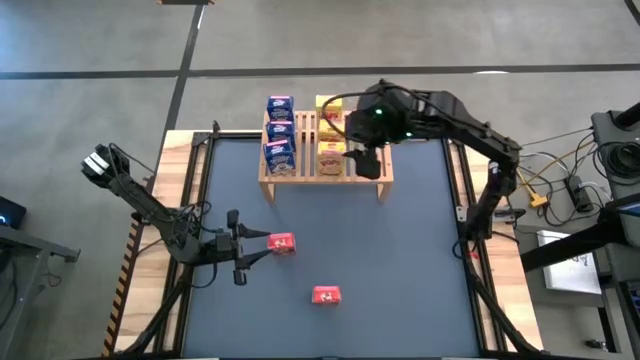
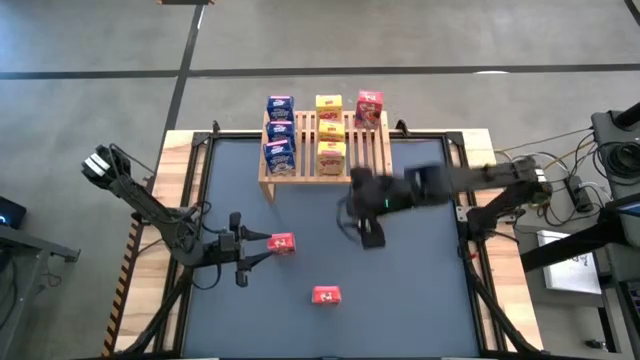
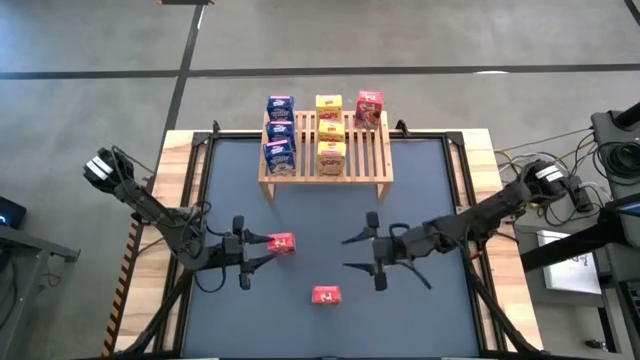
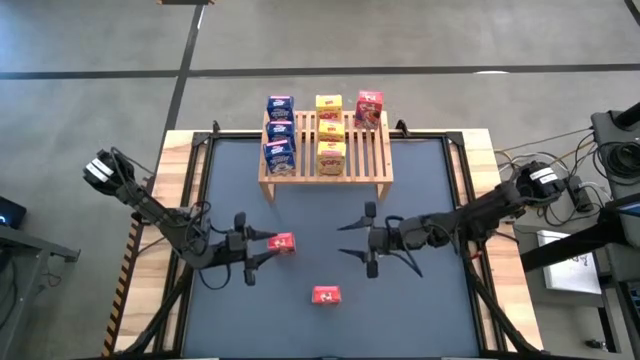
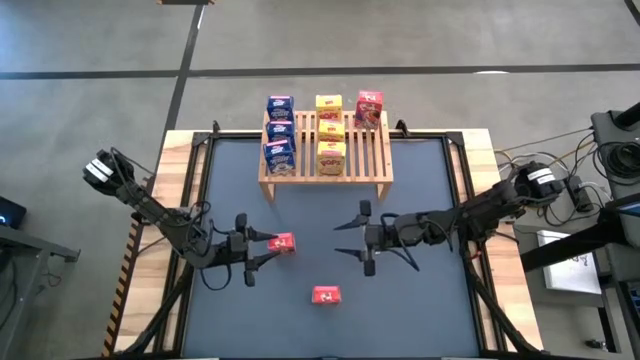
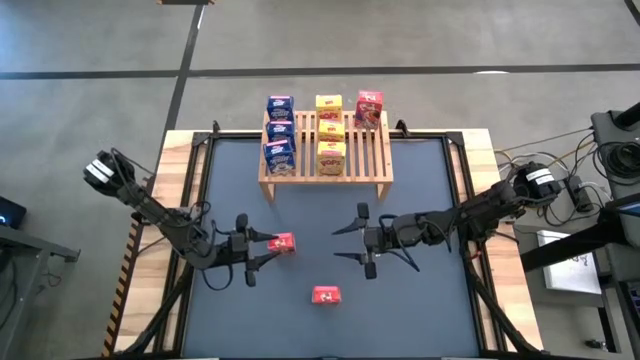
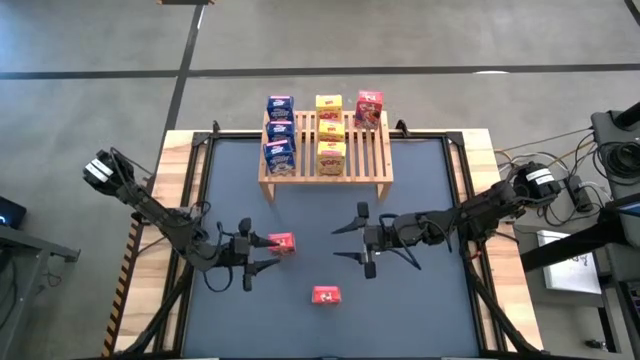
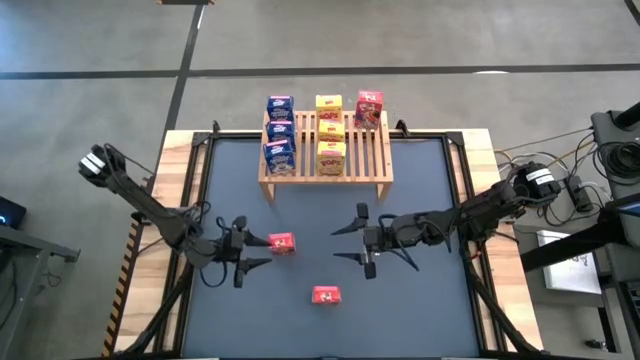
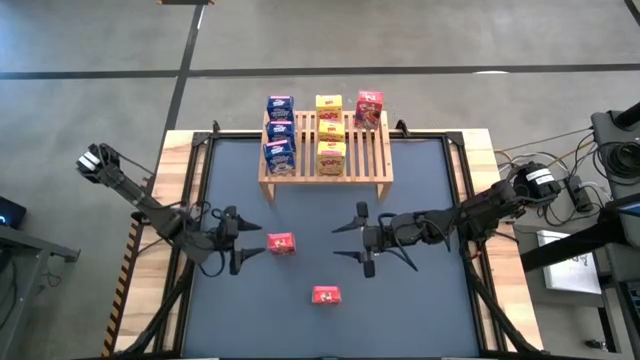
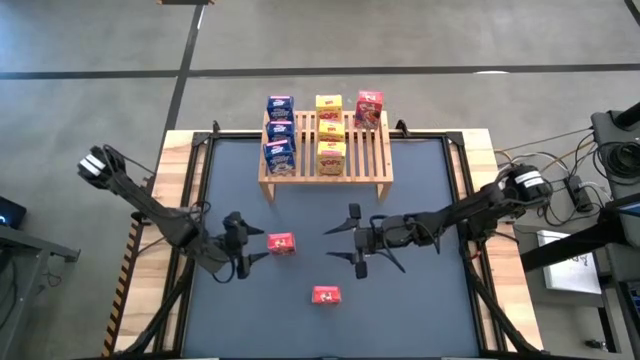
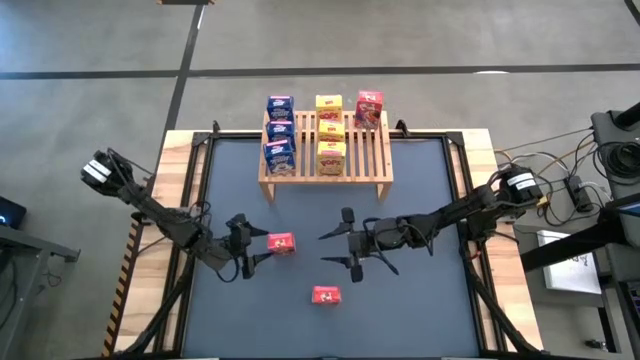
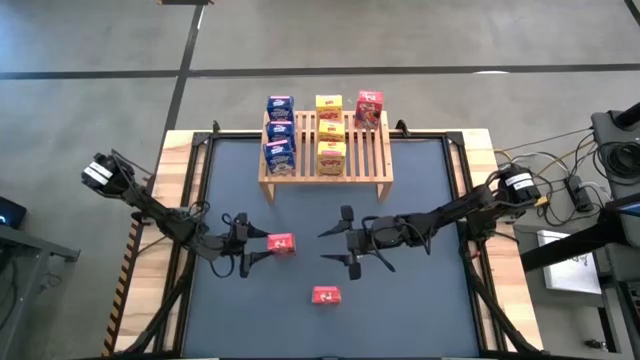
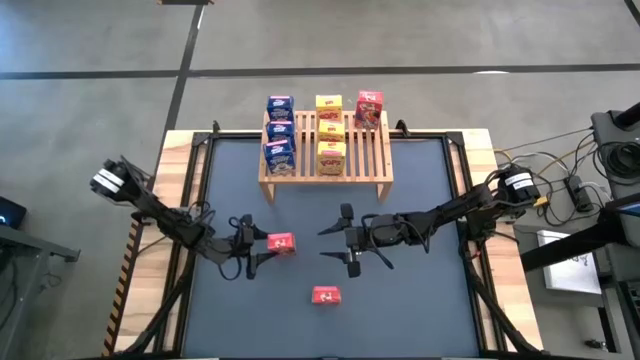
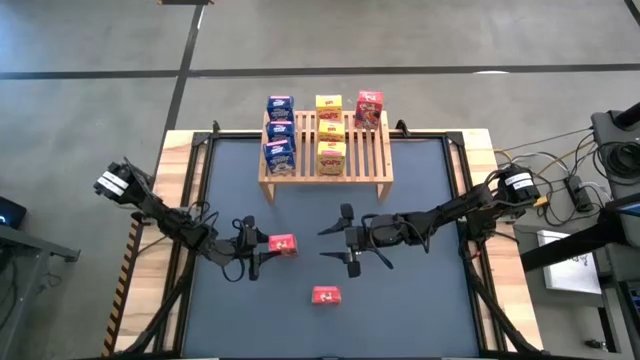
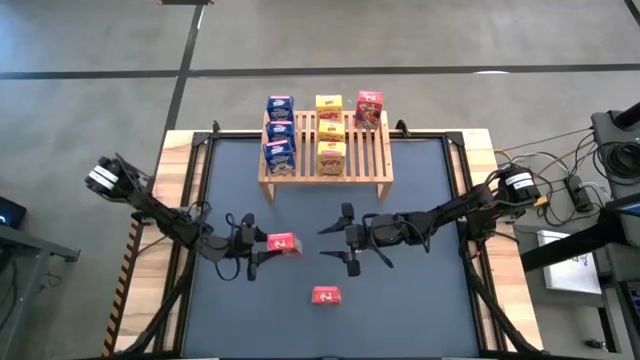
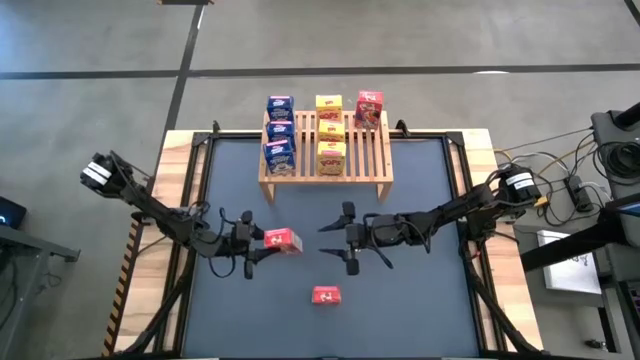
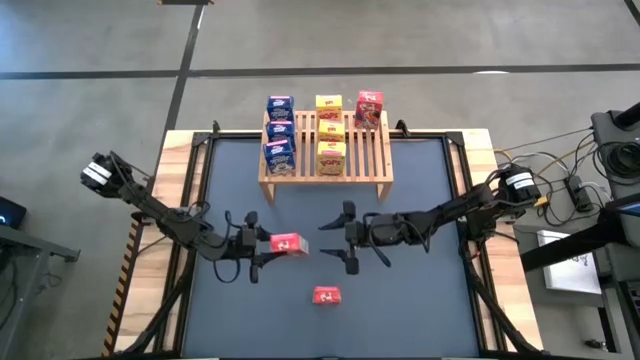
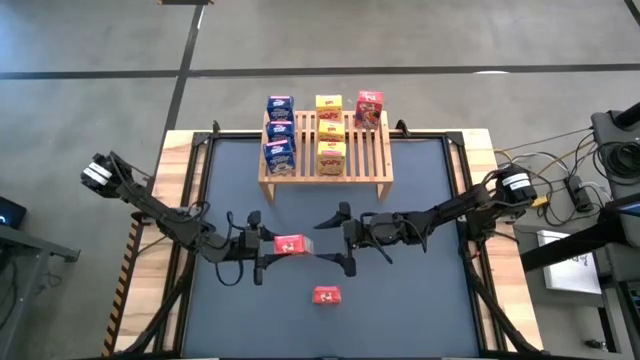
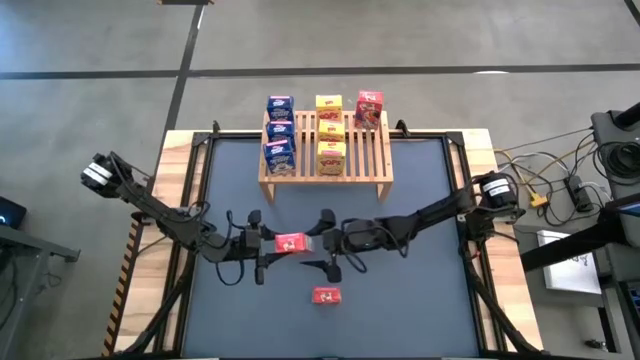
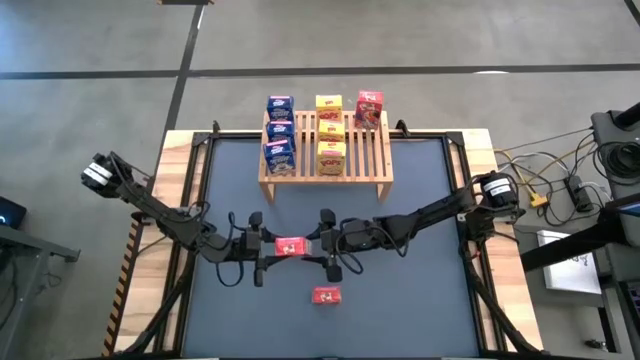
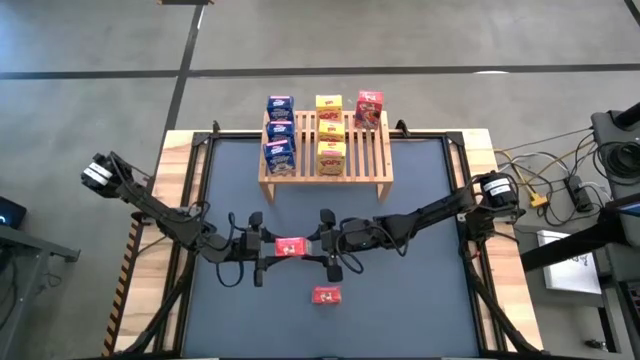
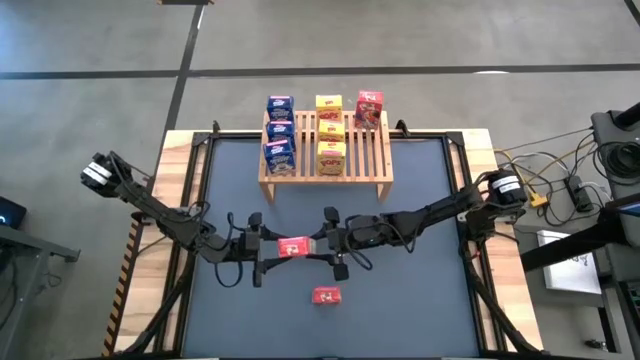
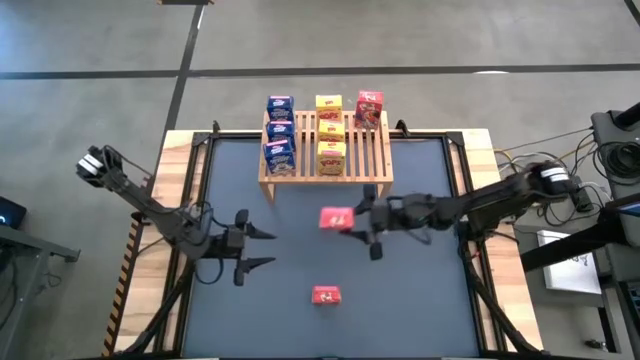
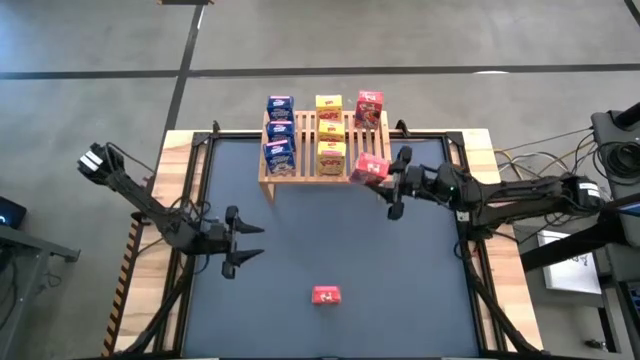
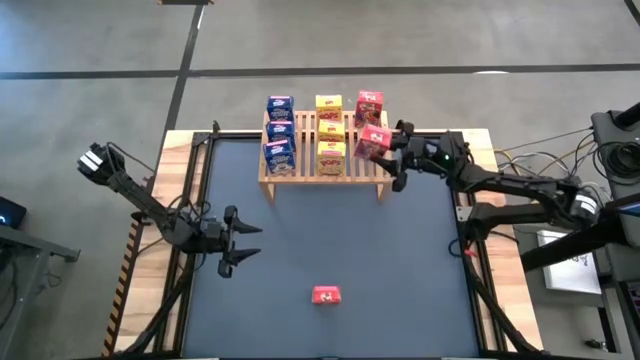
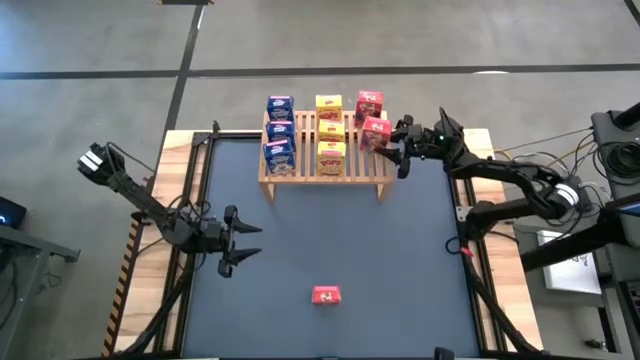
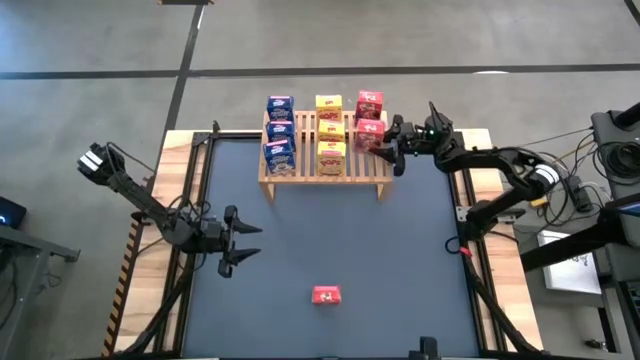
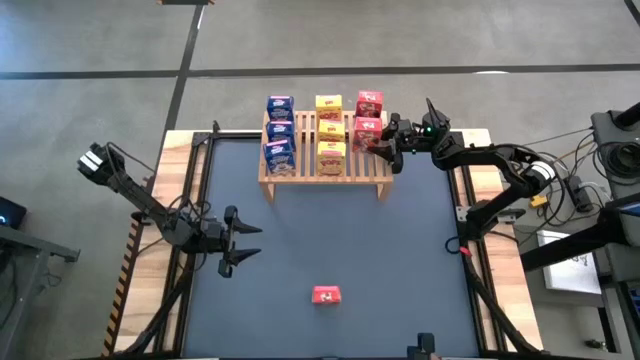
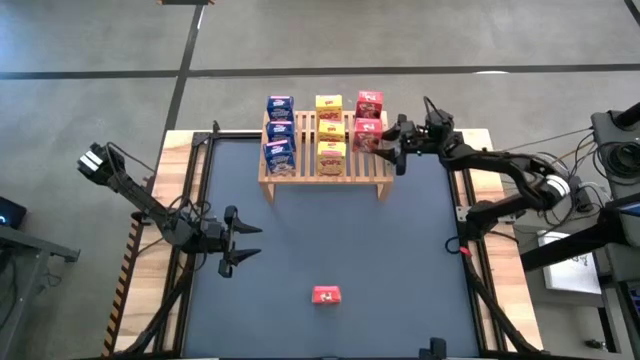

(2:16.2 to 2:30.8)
Task: Stack cereal on shelf
Put the top red cereal box on the shelf aligned with the red cereal box

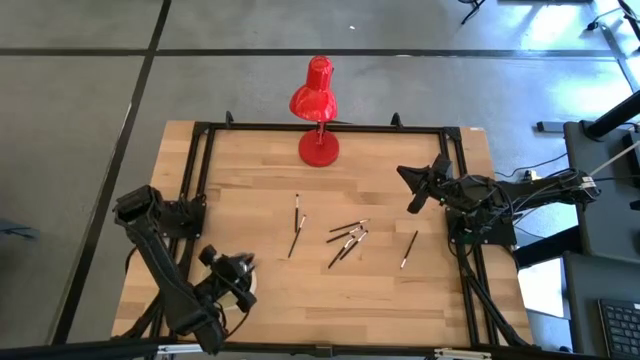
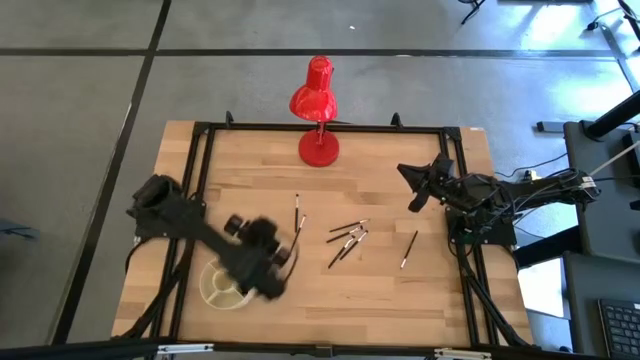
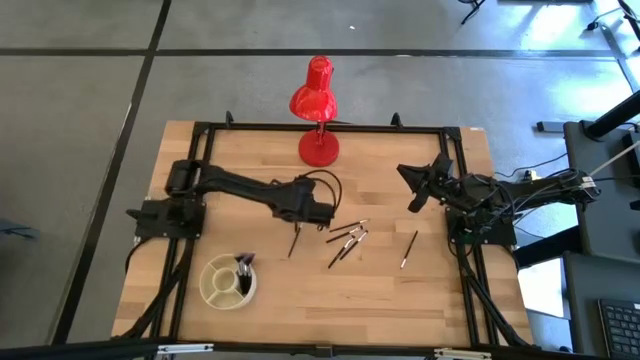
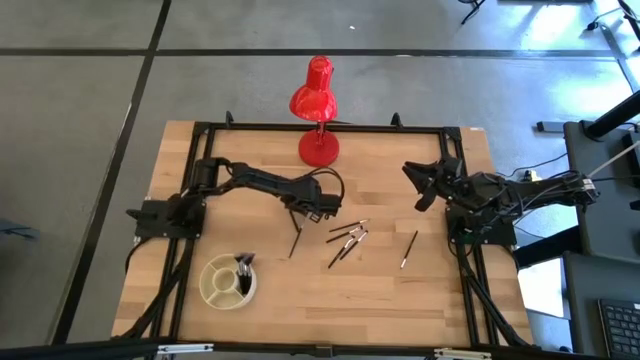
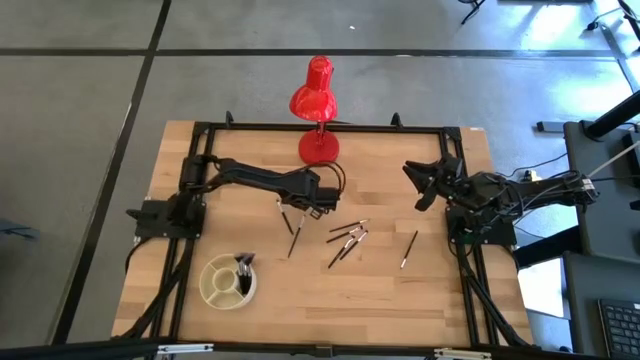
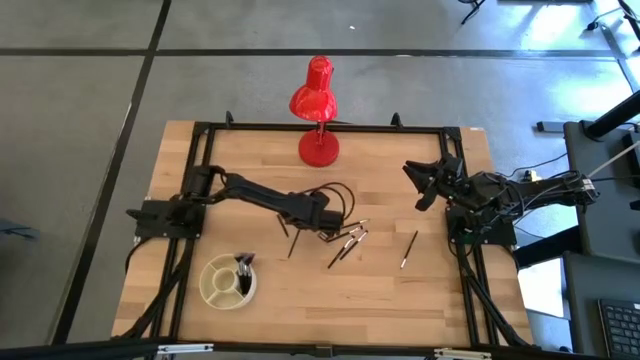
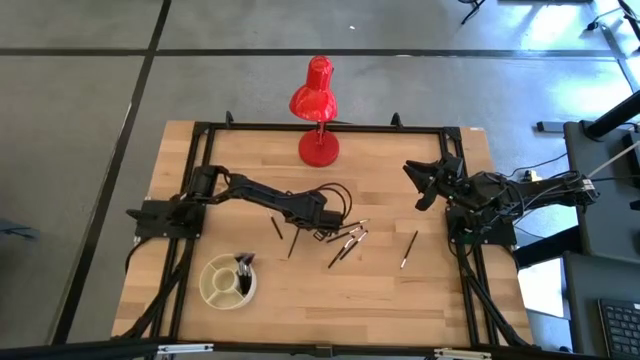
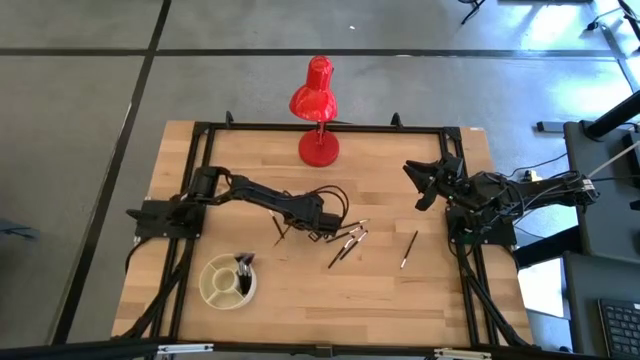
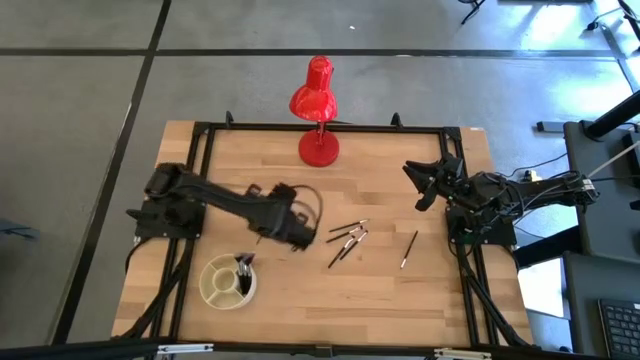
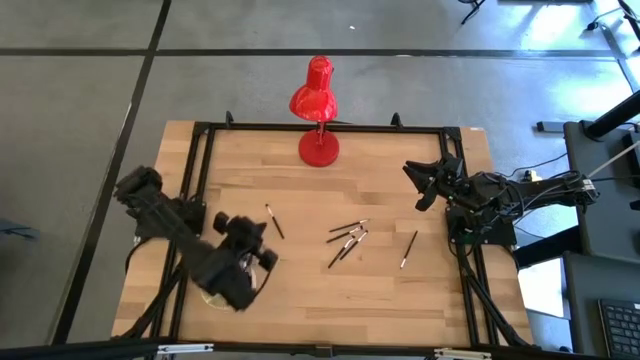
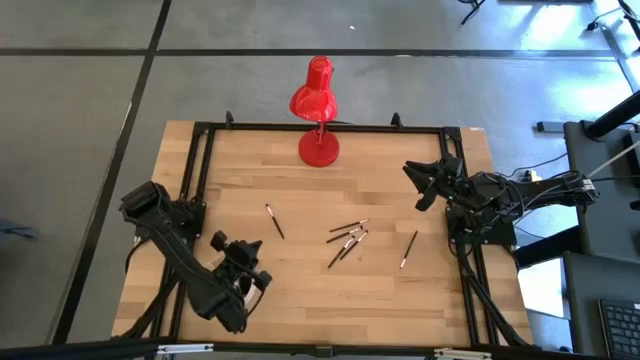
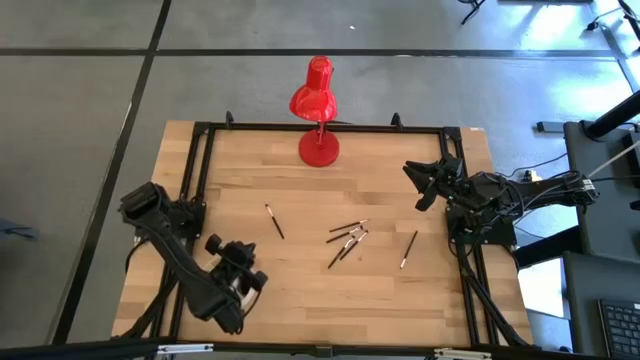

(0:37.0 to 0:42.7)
Task: Put items in baskets/containers
Put the eyeshadow brush into the pen organizer

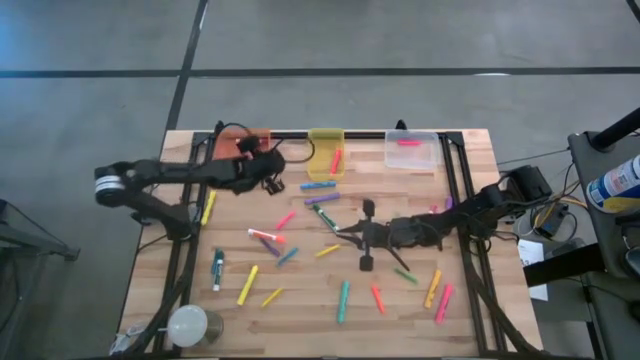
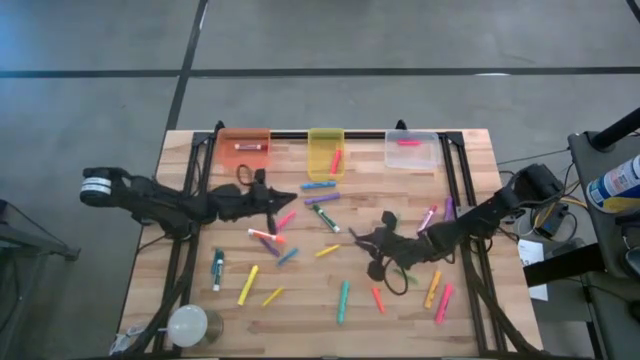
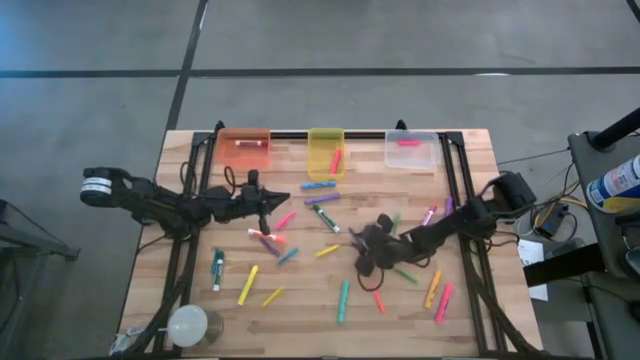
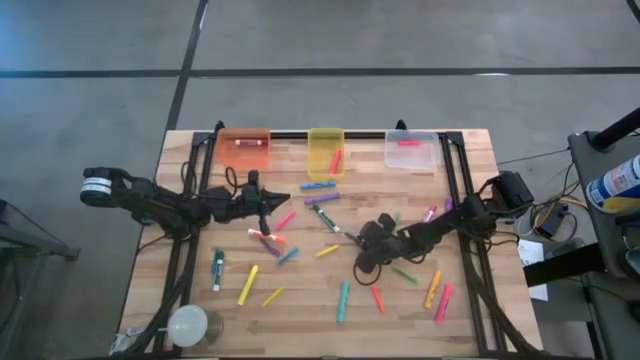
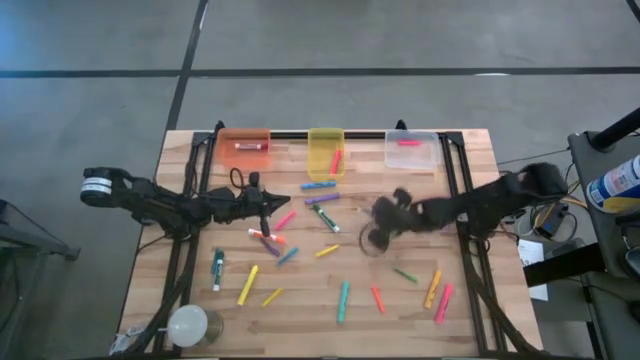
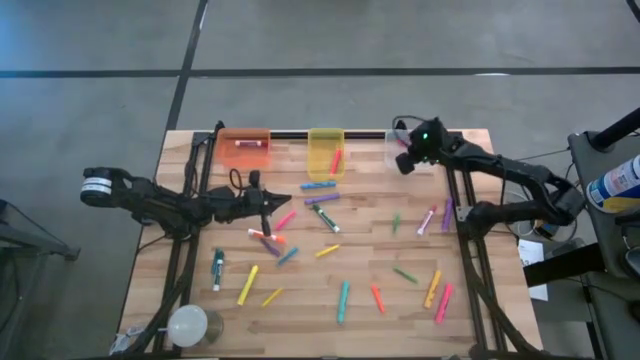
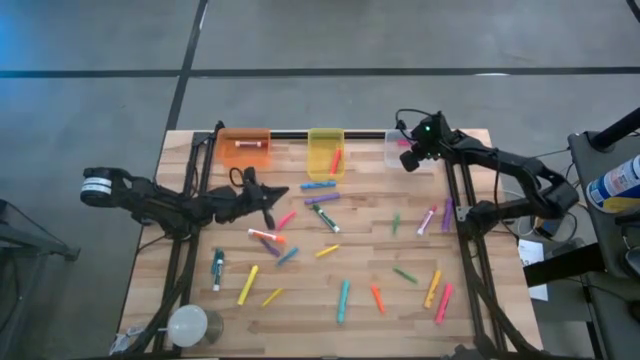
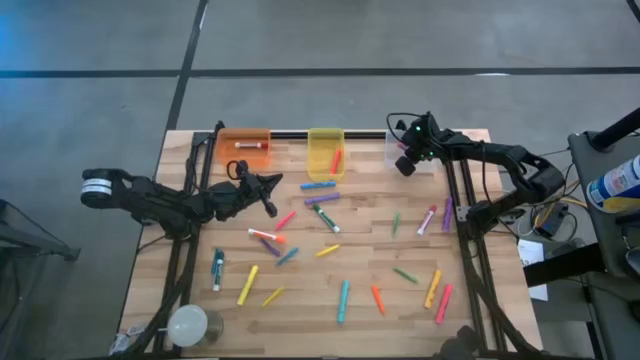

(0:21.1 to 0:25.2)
Task: Pick & Place Markers
Put the right violet pen into the transparent bin
